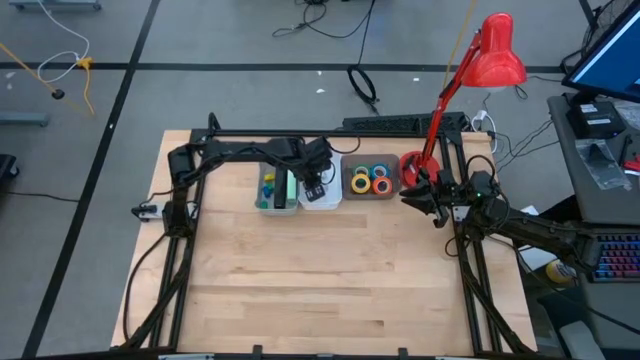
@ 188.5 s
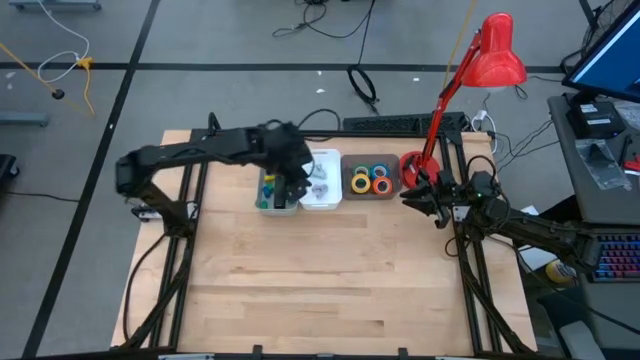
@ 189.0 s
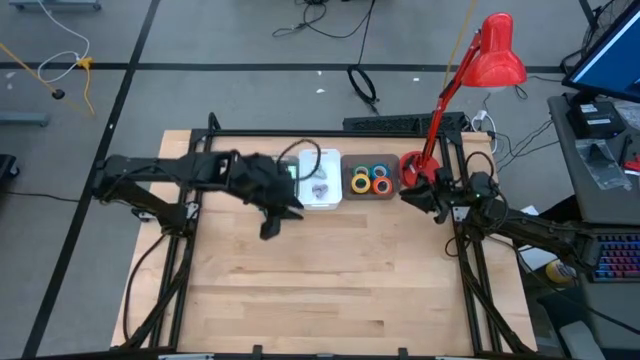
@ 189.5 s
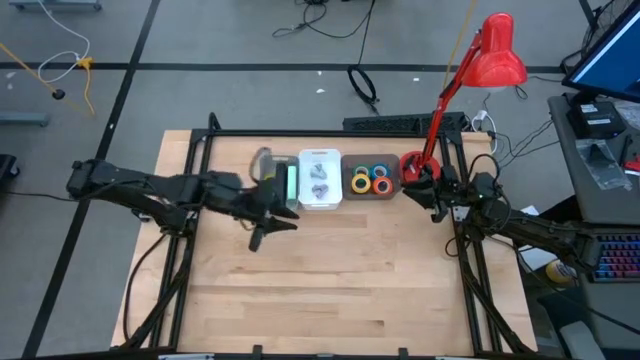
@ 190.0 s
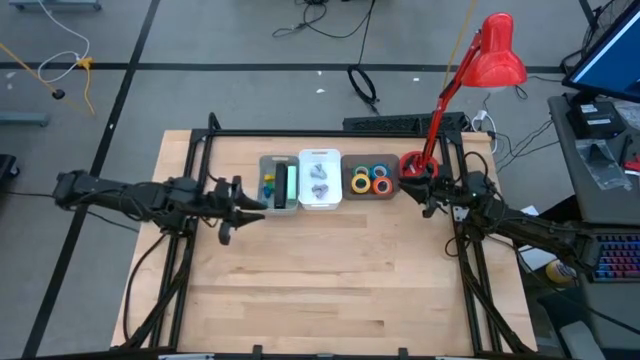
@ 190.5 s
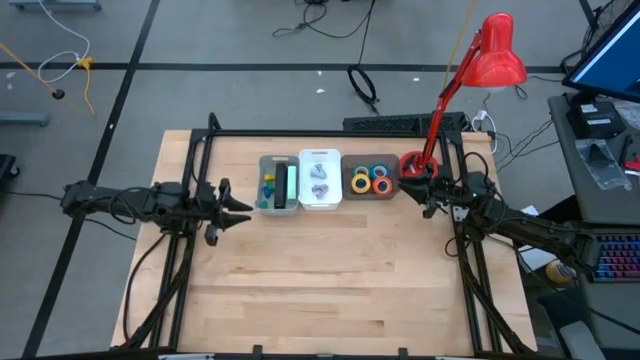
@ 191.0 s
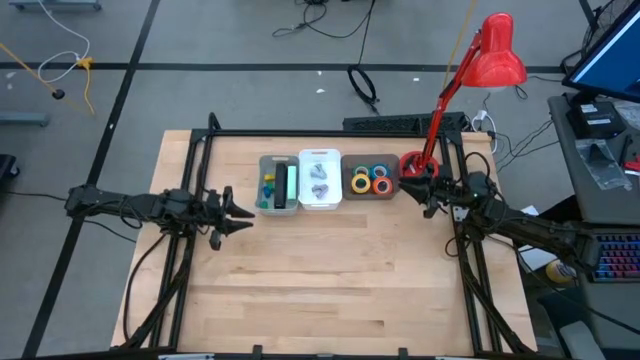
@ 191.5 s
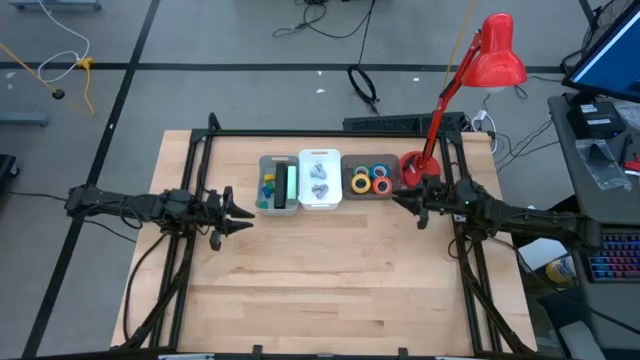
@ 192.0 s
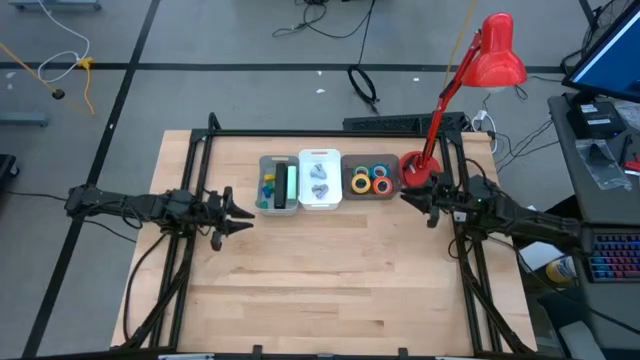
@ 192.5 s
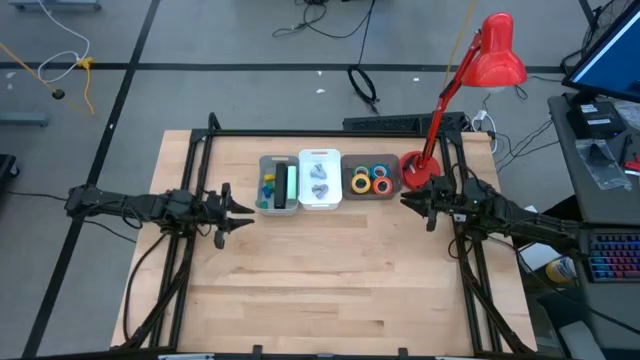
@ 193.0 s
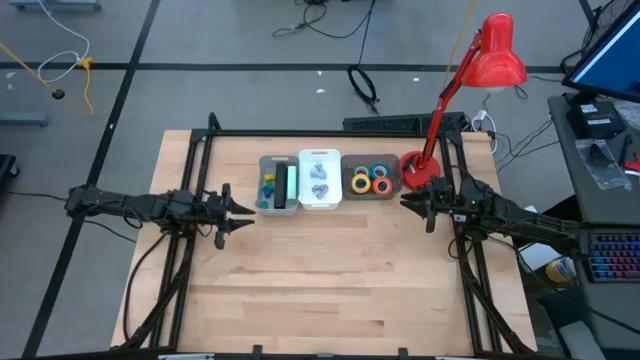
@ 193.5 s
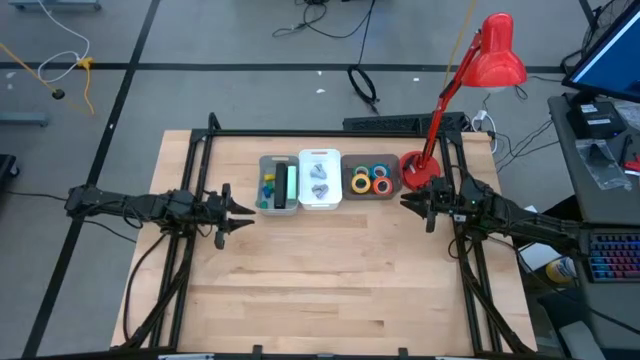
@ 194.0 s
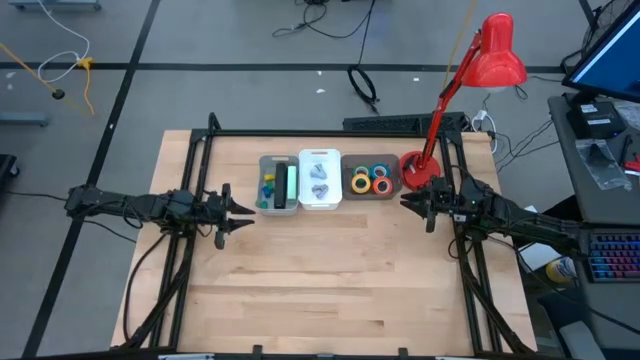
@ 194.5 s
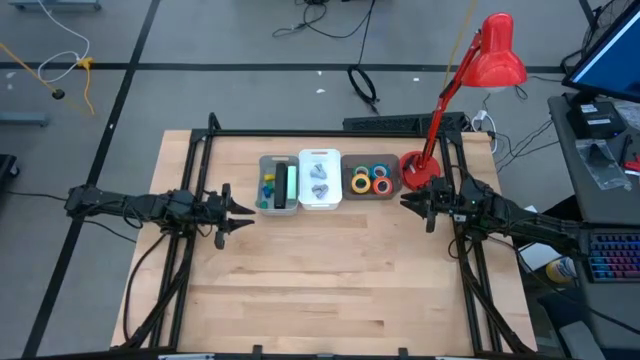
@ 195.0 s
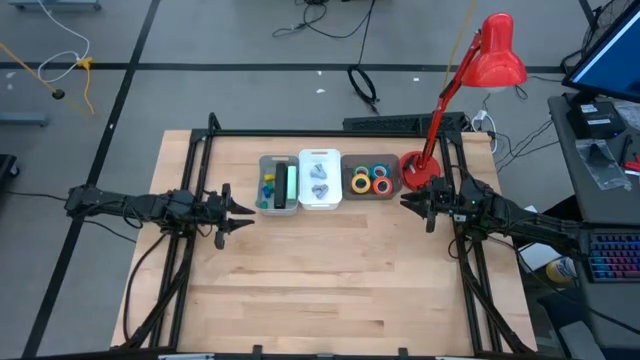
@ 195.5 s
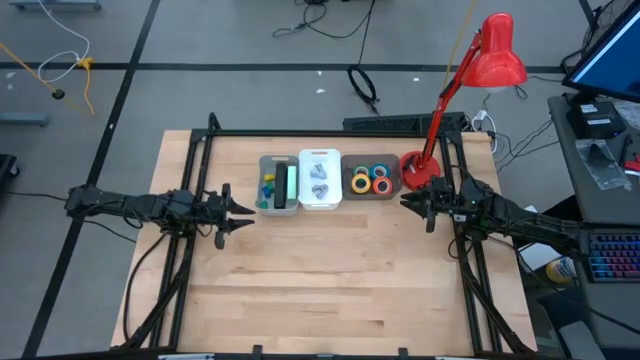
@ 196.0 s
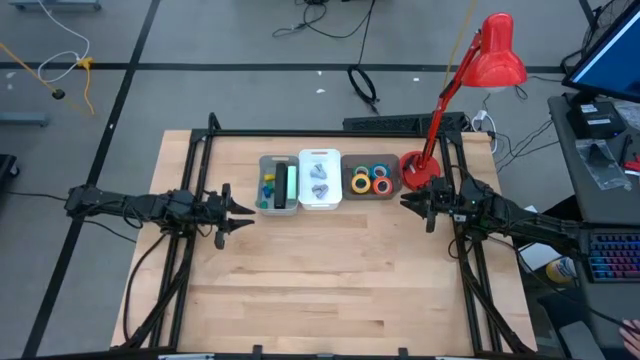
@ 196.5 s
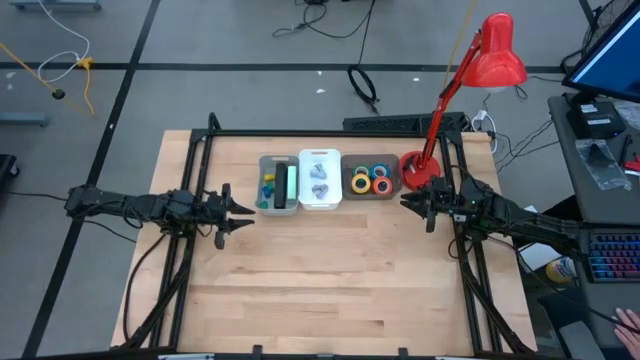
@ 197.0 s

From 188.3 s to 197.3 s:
Task: Pick and place Stapler, Stapler remover, tape
Return to home position

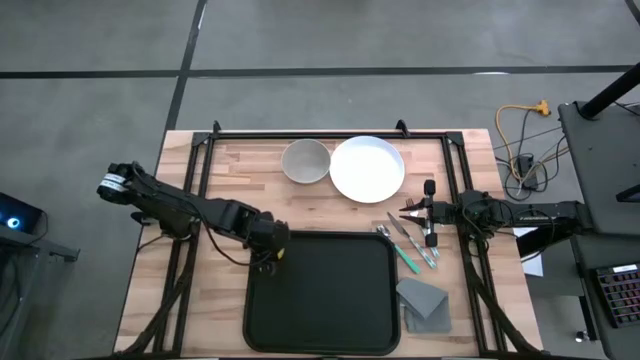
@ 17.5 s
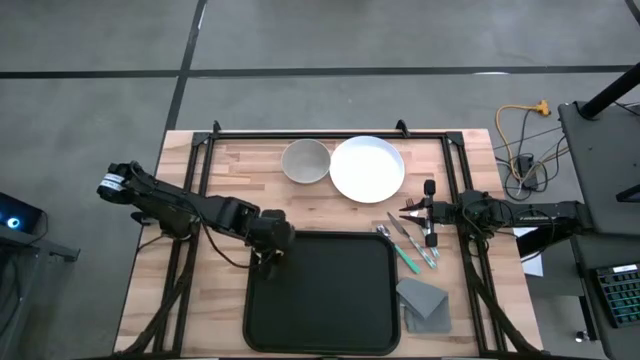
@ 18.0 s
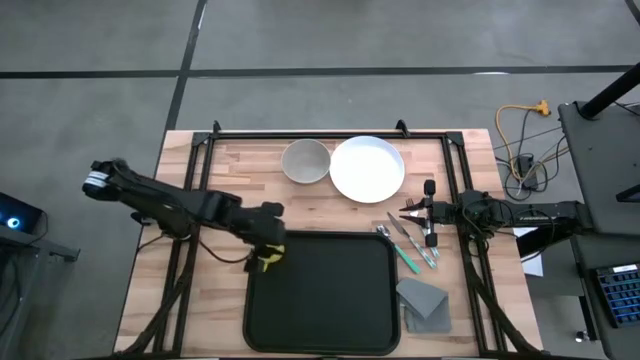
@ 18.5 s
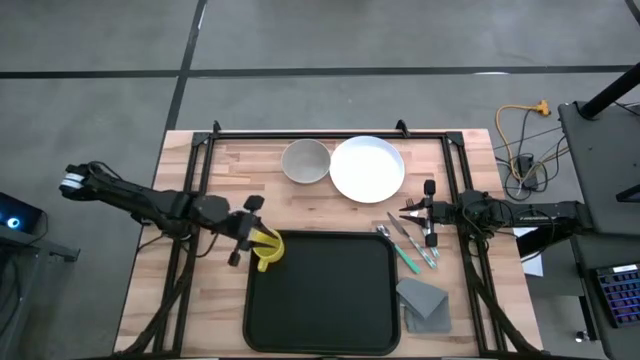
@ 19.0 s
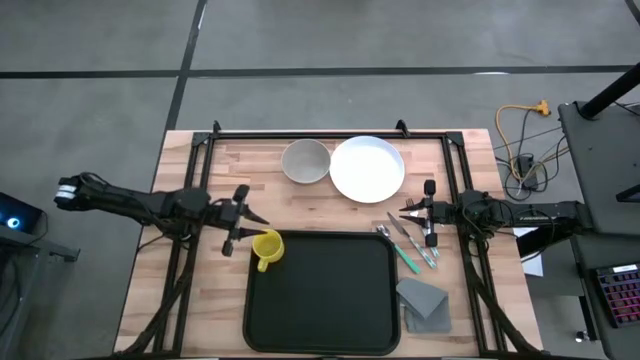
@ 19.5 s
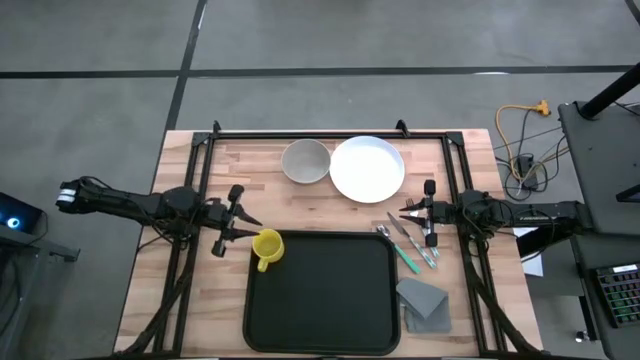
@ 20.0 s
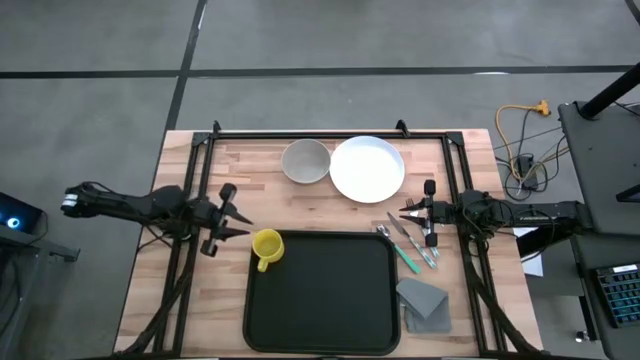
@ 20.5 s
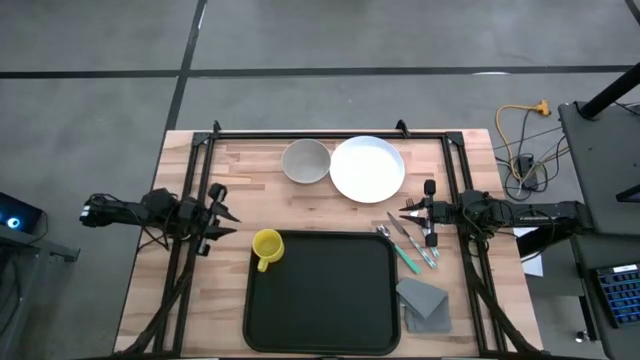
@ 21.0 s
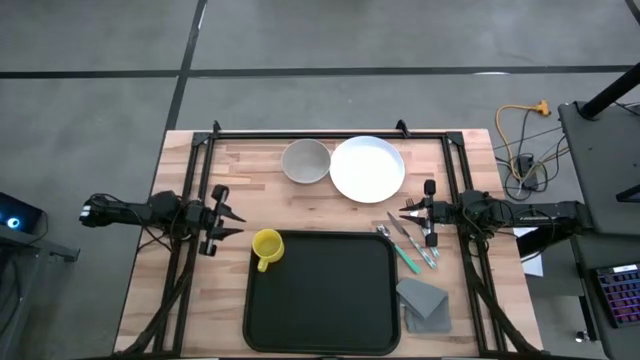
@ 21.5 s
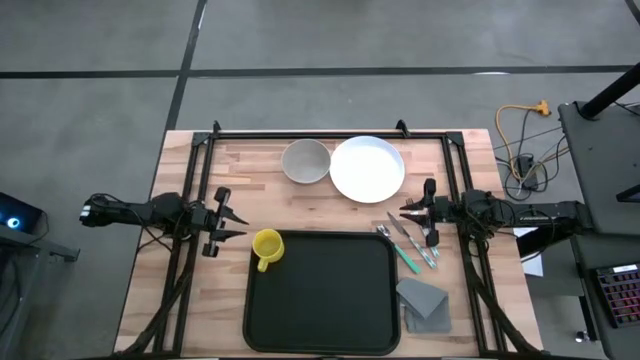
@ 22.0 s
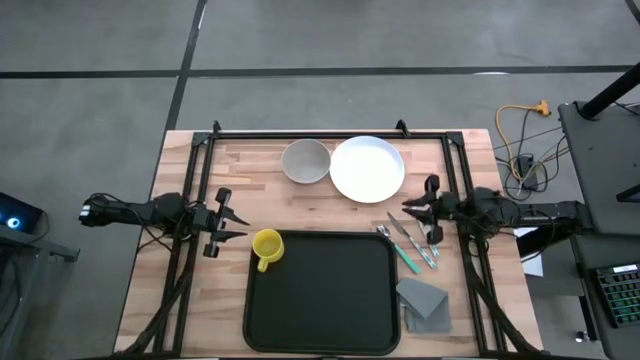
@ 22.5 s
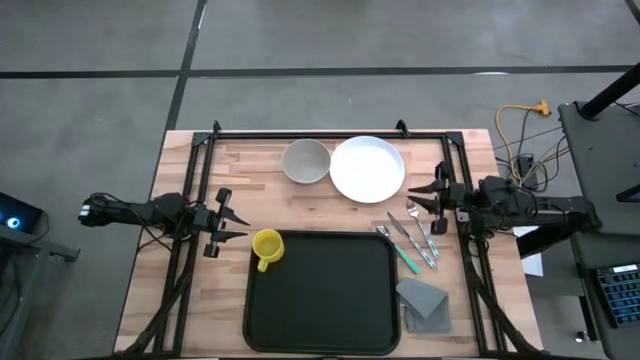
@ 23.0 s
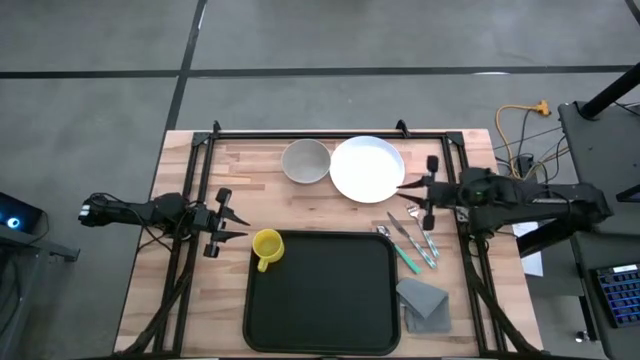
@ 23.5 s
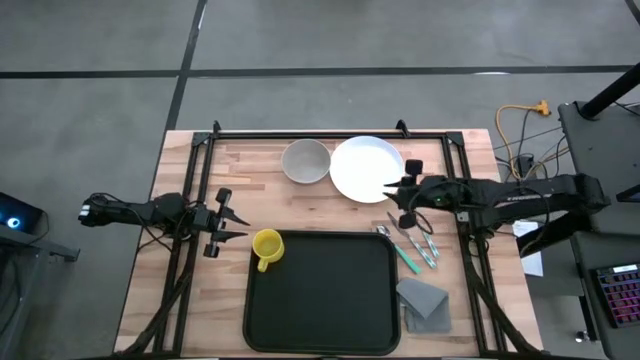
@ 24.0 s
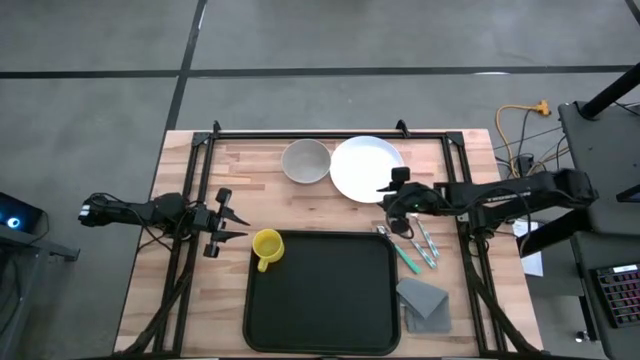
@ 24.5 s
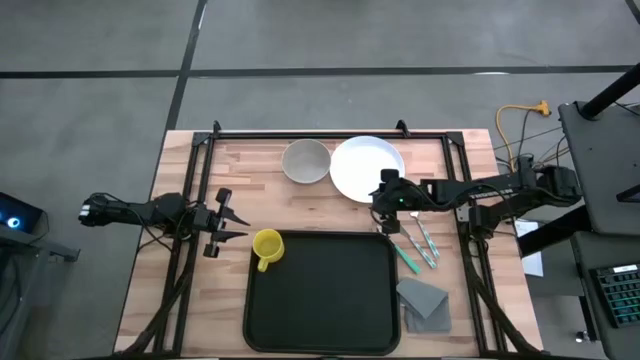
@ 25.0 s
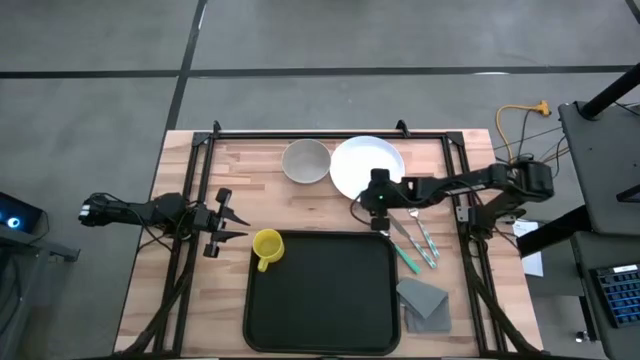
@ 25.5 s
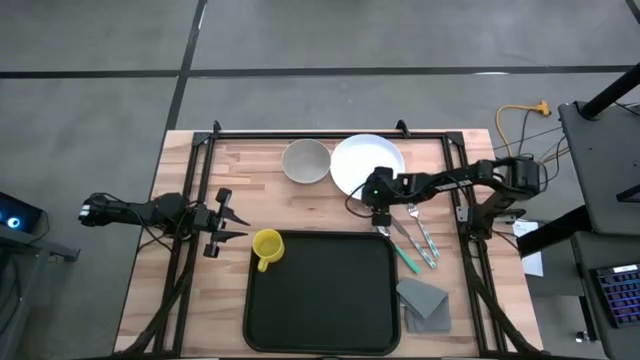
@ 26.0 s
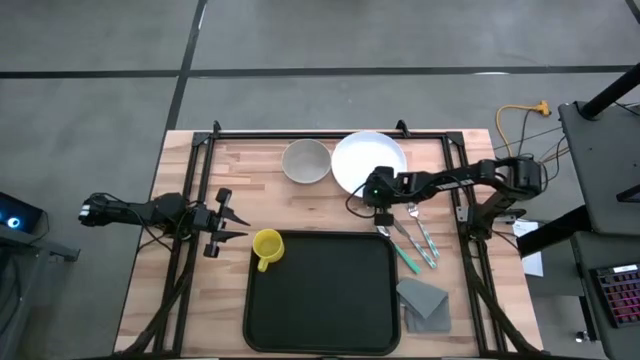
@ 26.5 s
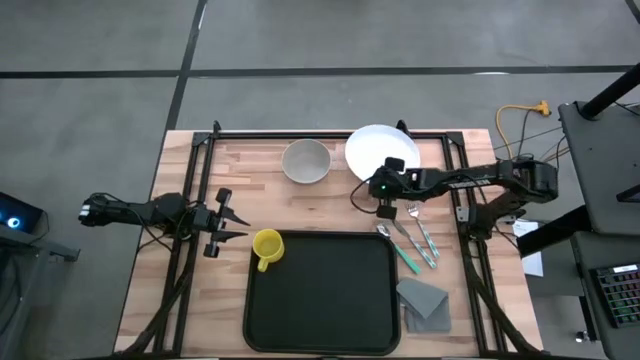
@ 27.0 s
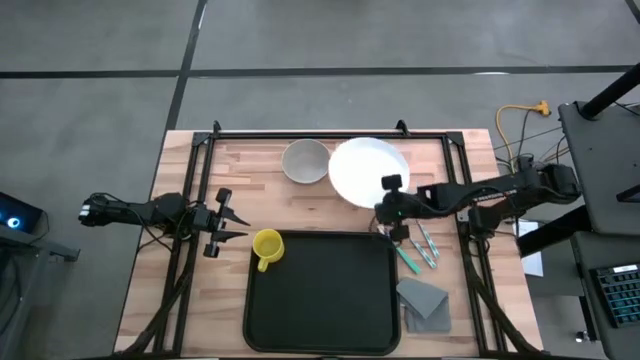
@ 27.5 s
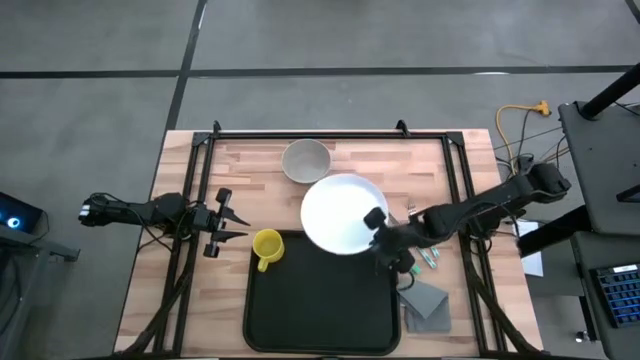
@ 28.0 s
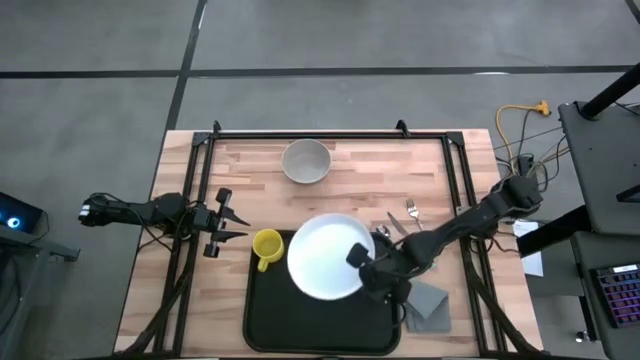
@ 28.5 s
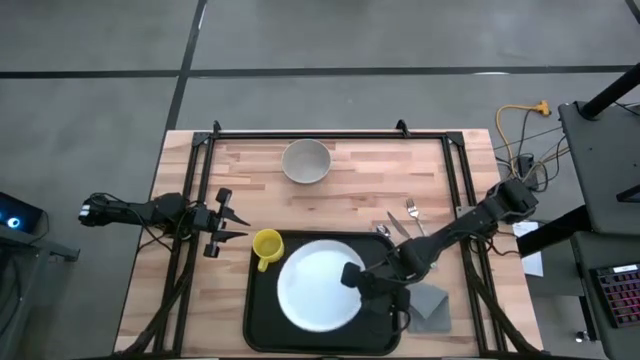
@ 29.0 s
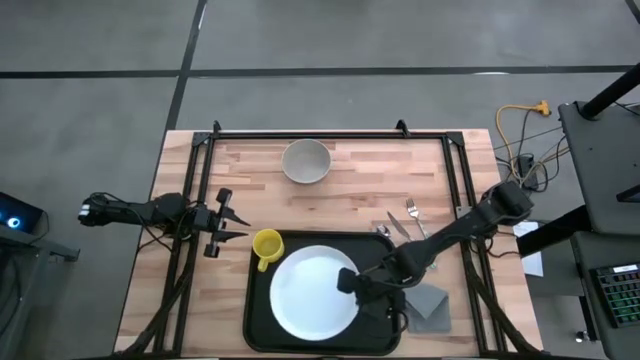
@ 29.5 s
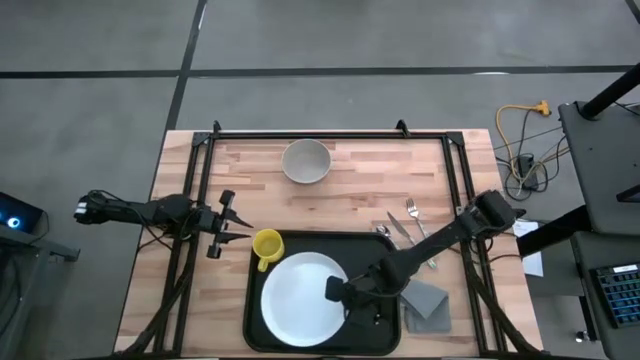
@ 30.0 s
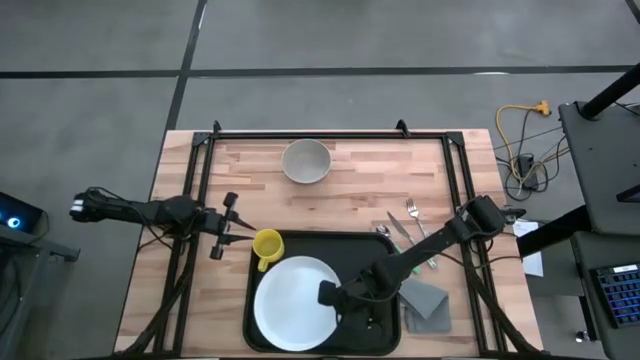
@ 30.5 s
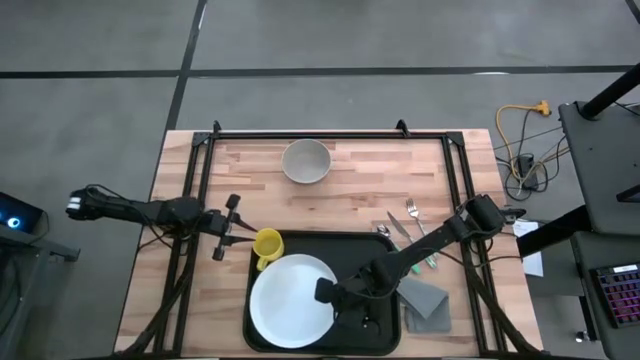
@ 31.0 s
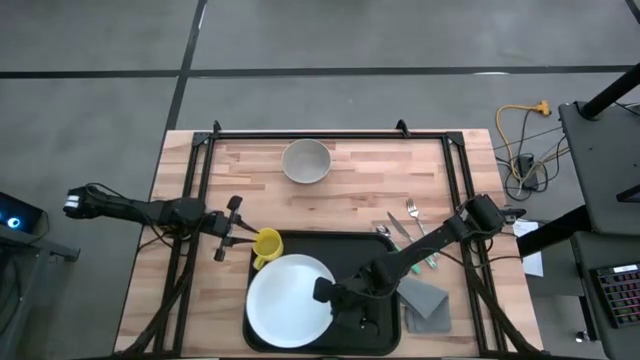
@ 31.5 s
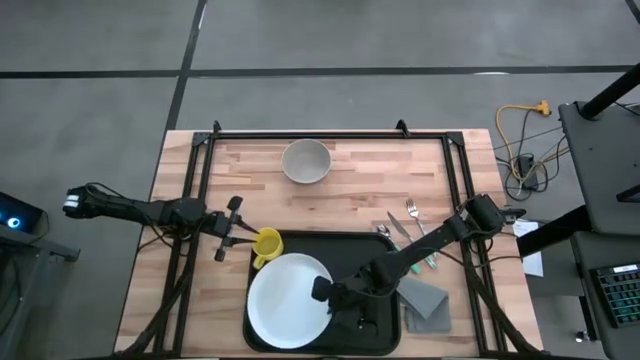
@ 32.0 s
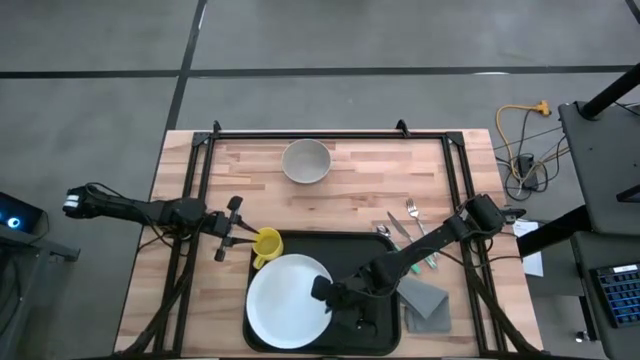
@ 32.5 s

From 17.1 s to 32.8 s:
Task: Set up tray
Put the white plate on the black tray to the bottom right of the yellow mug
